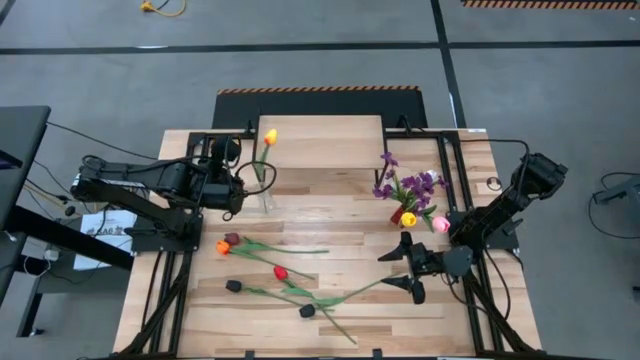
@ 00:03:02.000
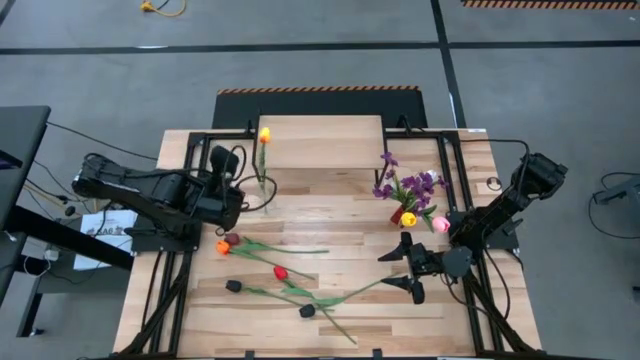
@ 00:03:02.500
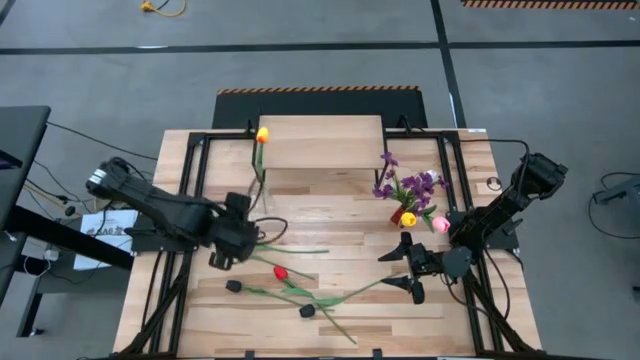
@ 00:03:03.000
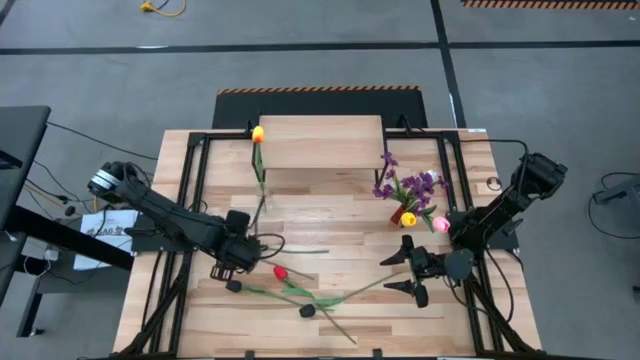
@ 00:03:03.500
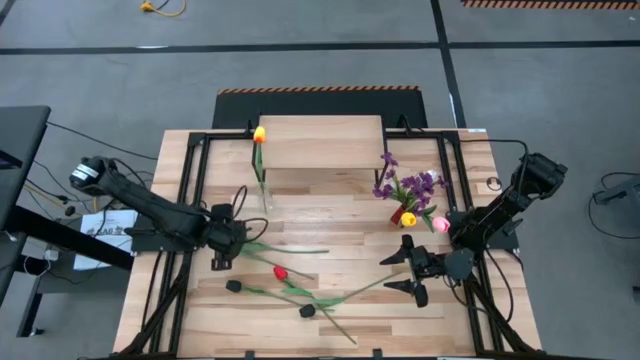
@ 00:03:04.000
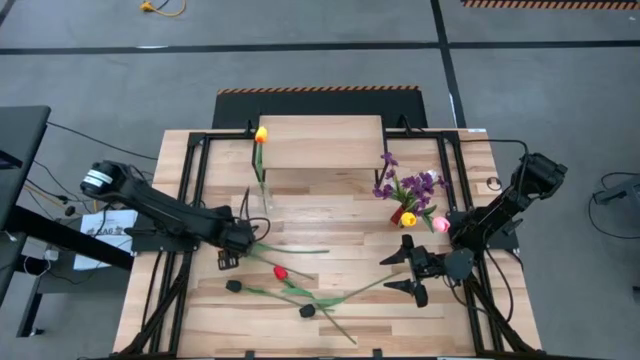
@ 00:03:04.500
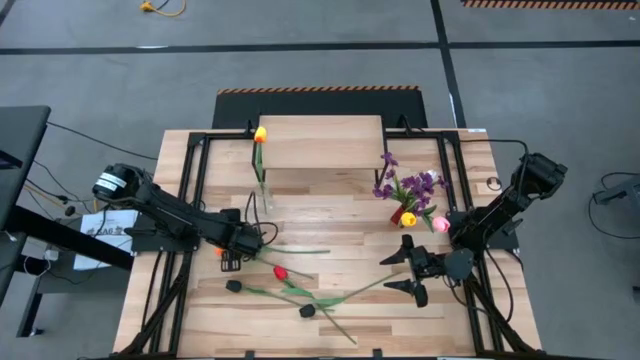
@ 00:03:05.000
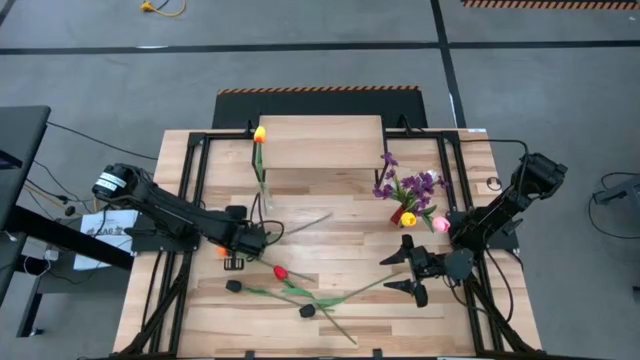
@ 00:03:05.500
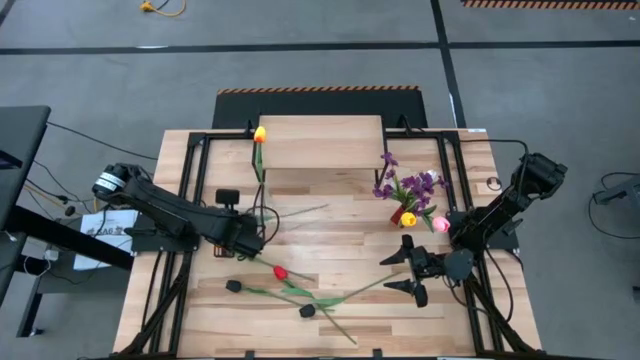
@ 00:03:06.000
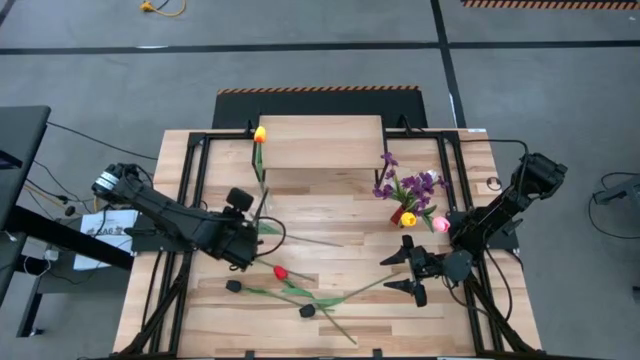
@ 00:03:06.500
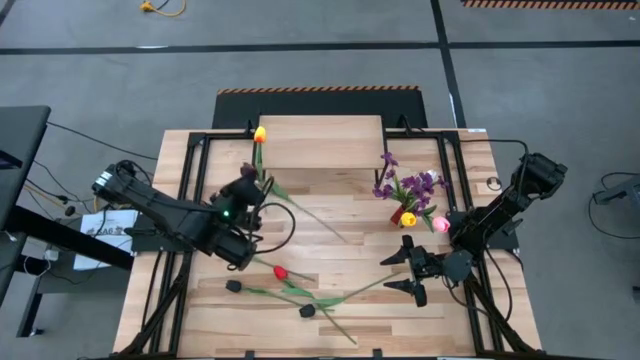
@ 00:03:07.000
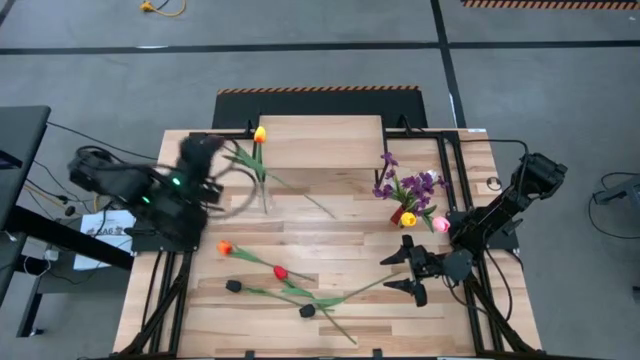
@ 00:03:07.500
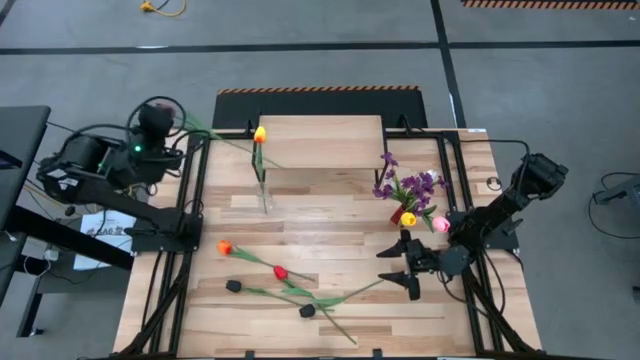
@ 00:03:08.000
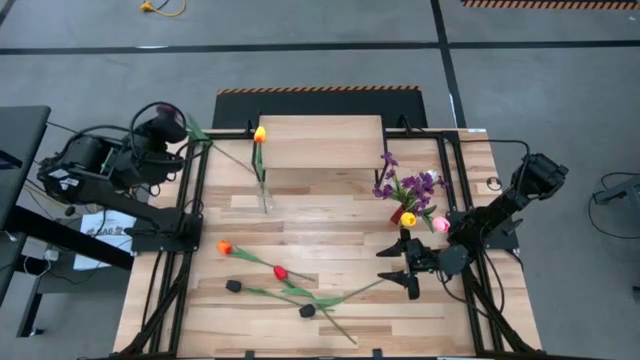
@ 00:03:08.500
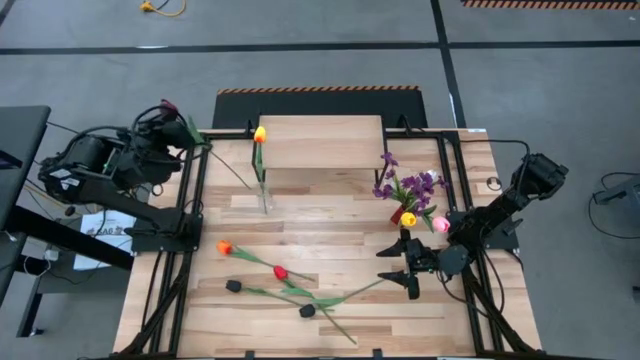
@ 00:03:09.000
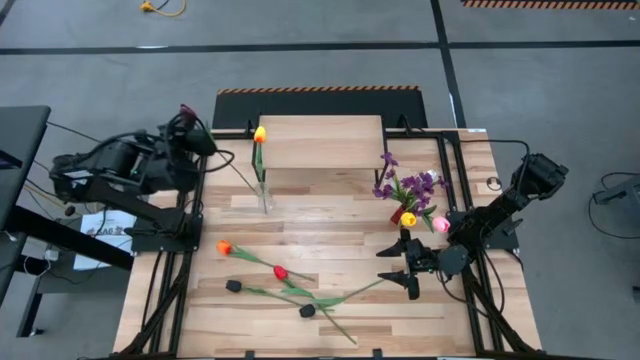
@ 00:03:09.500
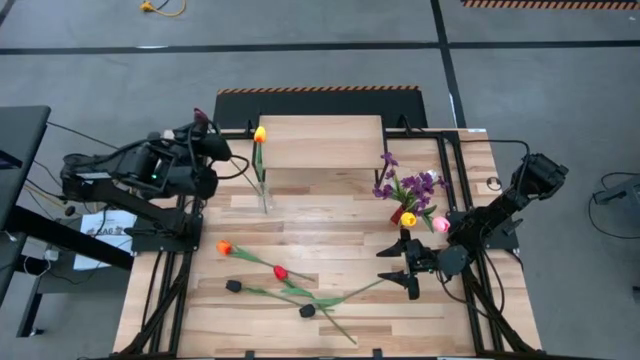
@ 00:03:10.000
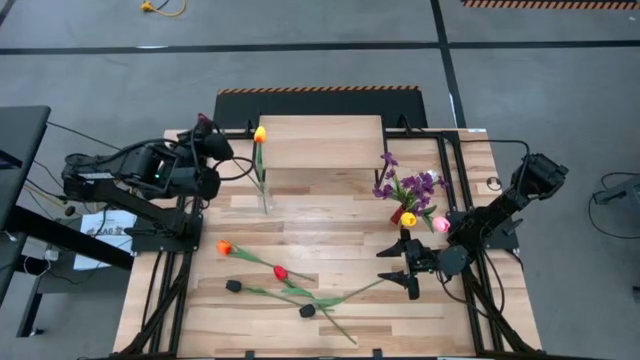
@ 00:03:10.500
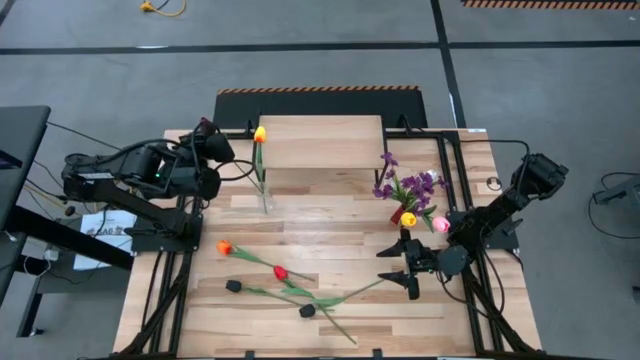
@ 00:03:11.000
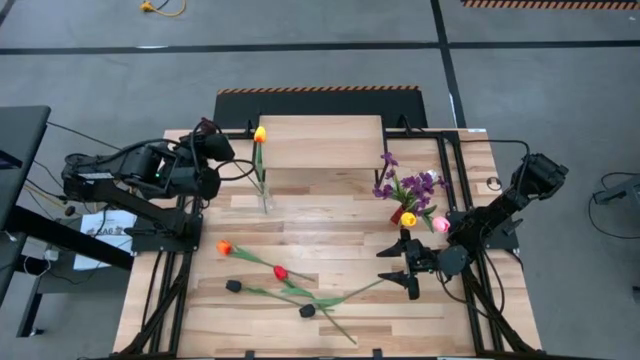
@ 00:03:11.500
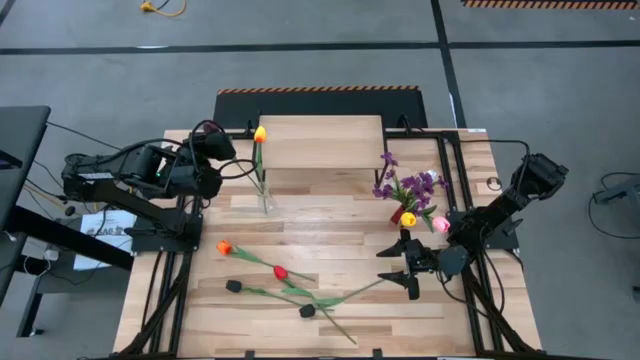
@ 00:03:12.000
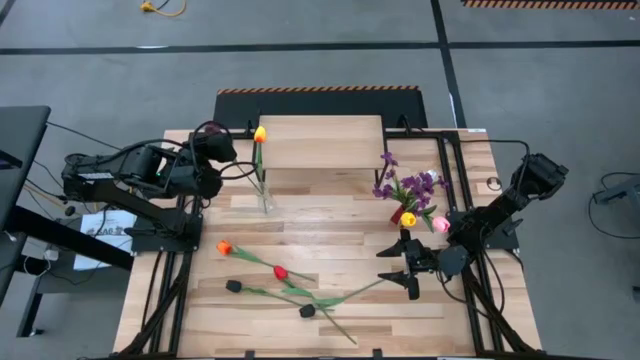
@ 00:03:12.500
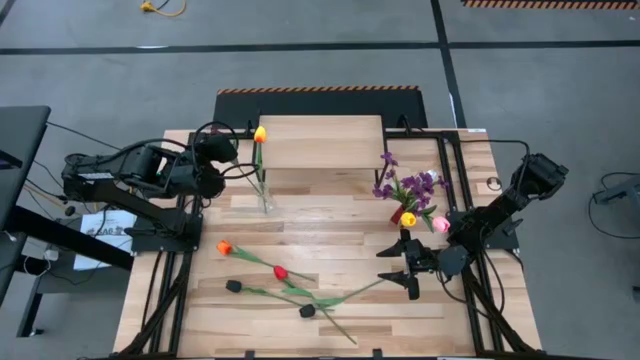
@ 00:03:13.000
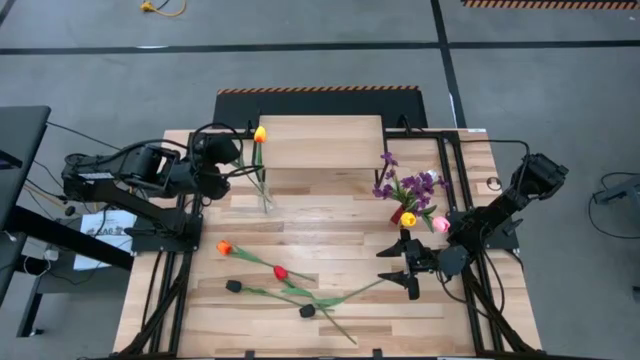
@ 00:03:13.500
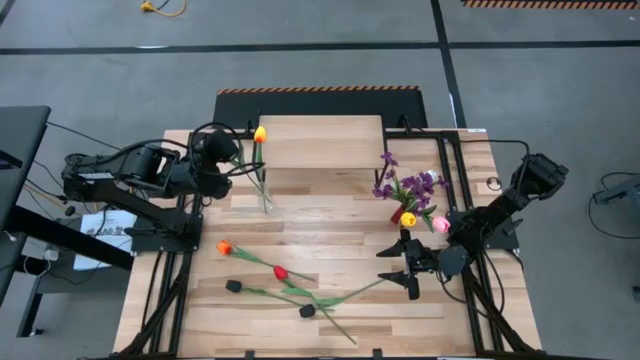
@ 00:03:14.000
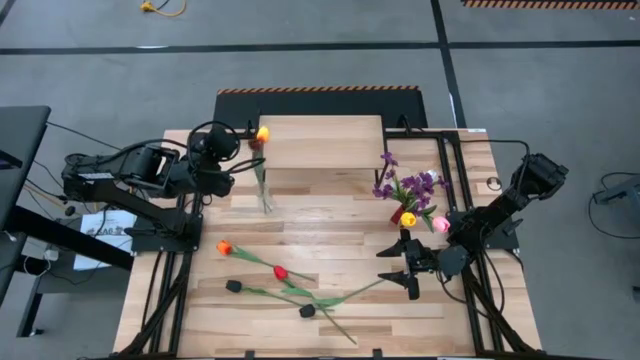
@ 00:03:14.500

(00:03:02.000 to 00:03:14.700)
Task: Pick and place flowers into a vace then onto a shelf
Put the dark red flower into the transparent vase

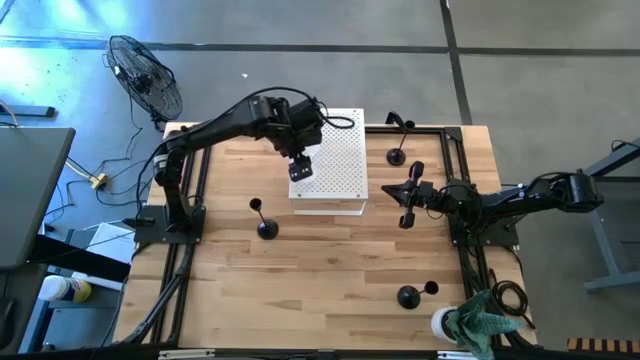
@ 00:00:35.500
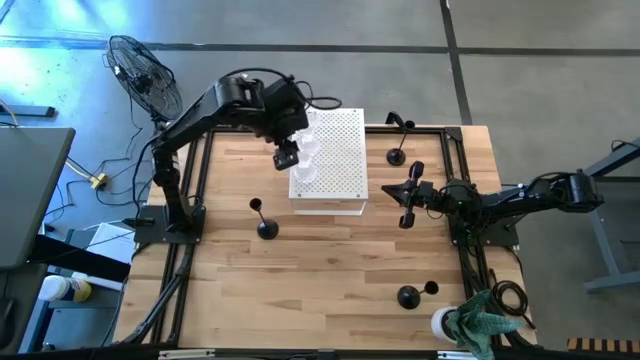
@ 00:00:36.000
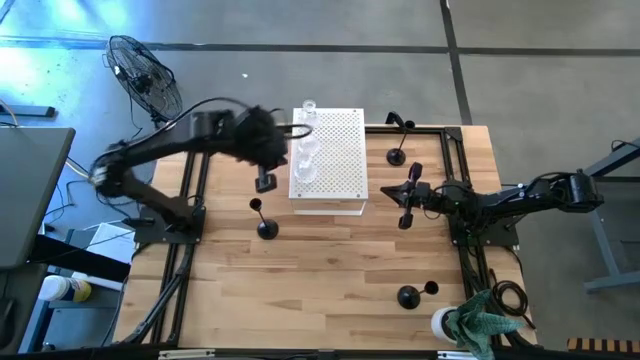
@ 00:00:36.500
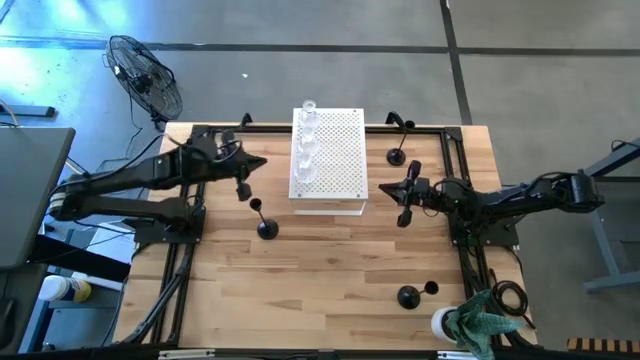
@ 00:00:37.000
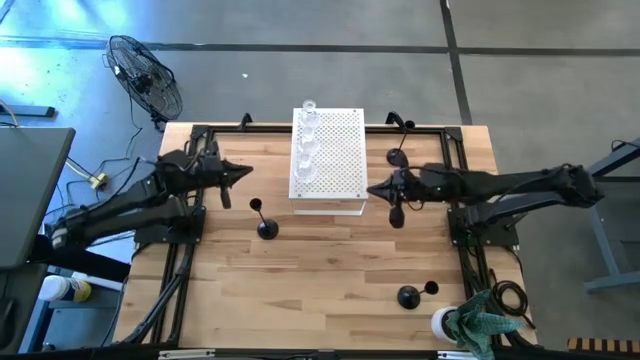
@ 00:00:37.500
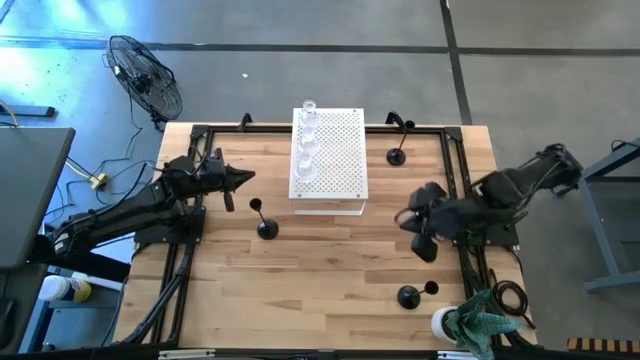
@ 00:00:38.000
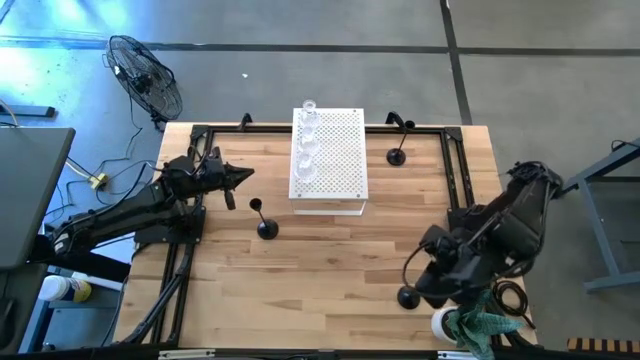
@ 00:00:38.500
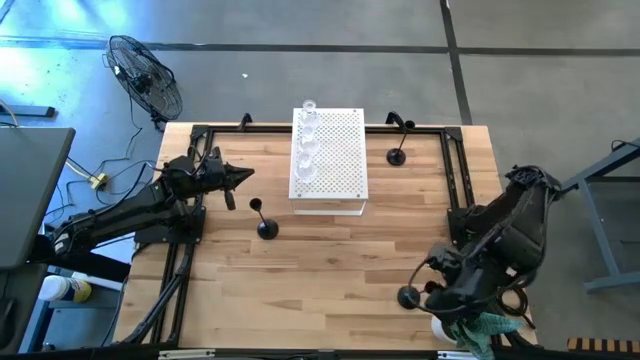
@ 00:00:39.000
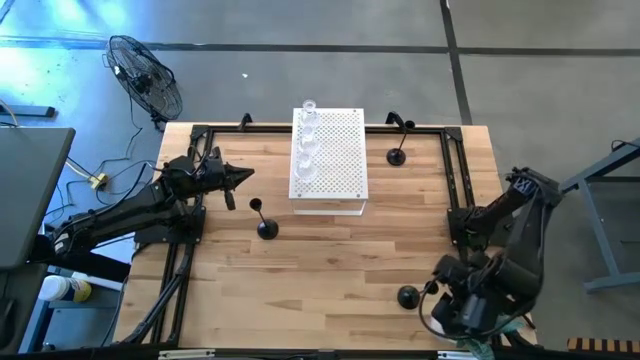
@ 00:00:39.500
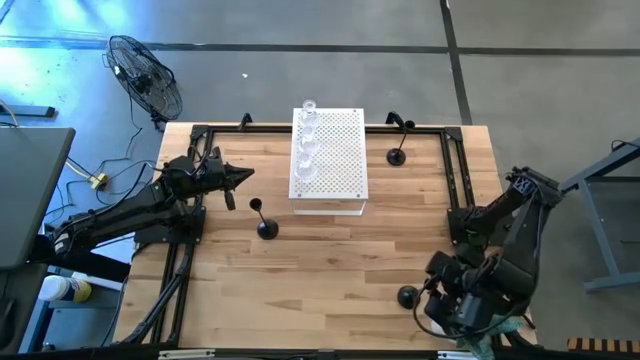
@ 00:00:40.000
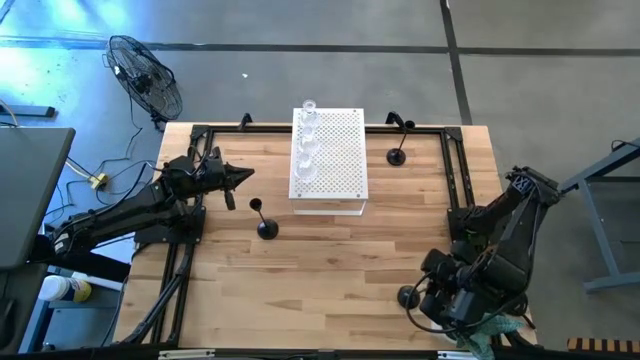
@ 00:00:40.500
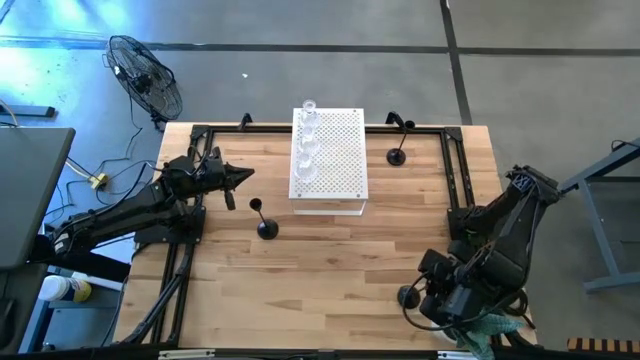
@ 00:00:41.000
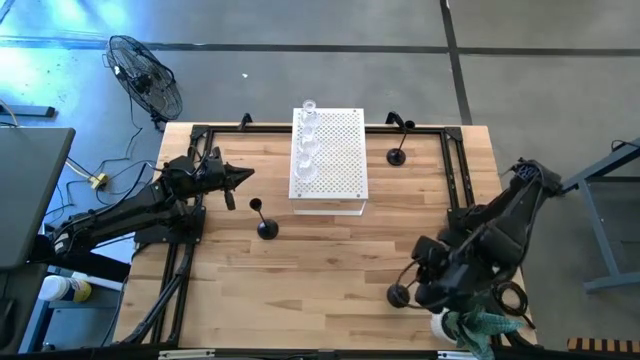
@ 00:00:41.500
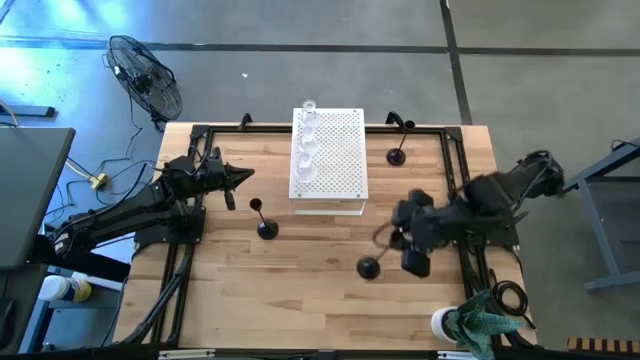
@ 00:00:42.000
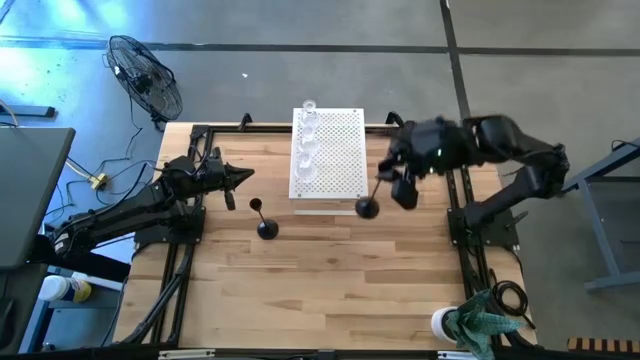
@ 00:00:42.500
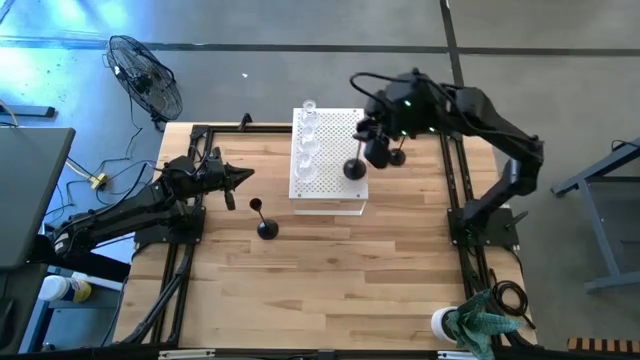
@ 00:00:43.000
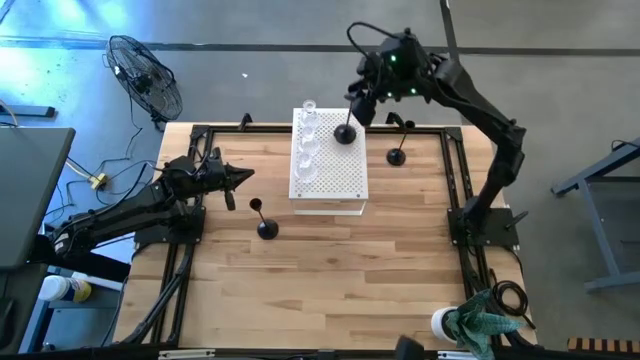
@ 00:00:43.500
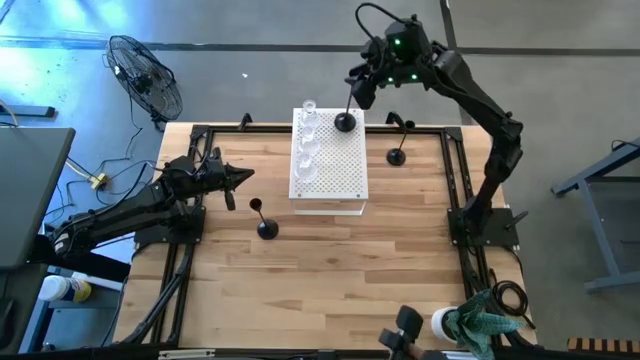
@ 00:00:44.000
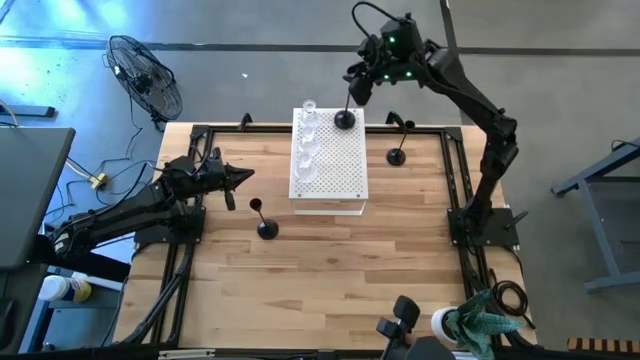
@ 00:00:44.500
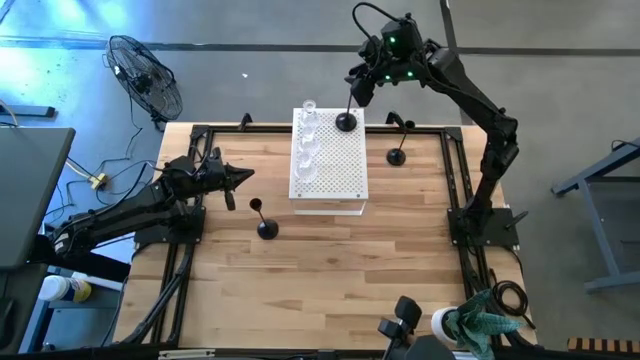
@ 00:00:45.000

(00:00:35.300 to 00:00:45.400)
Task: Pick & Place candle stick holders
Put the bottom black candle holder on the shelf
